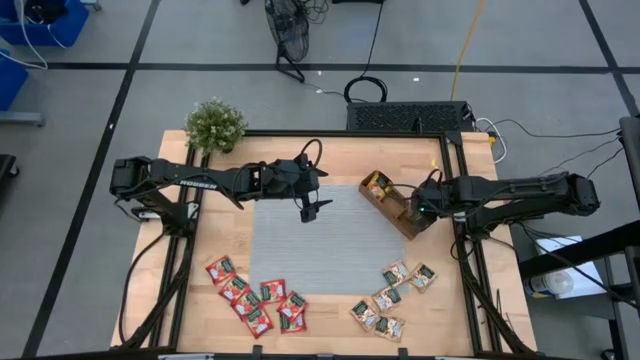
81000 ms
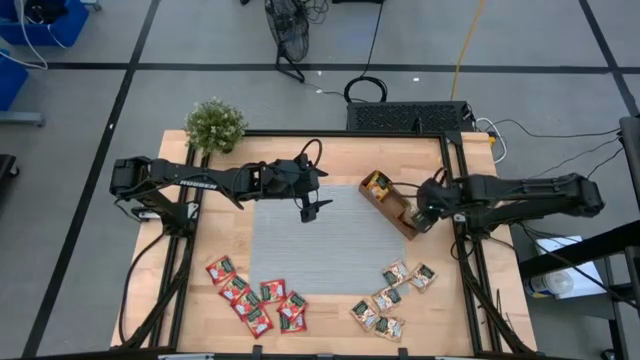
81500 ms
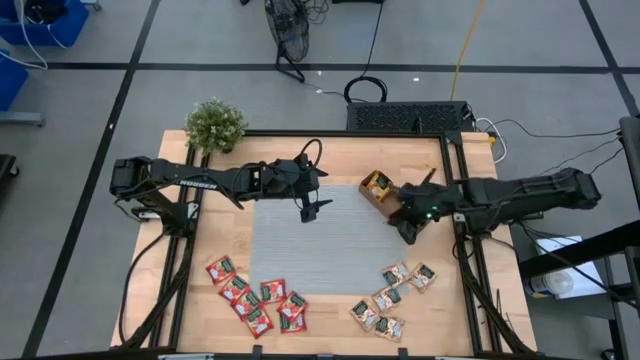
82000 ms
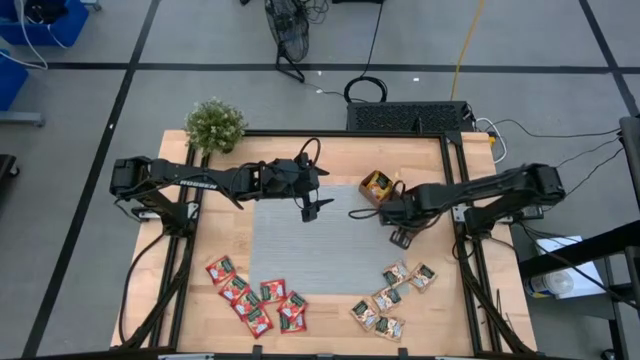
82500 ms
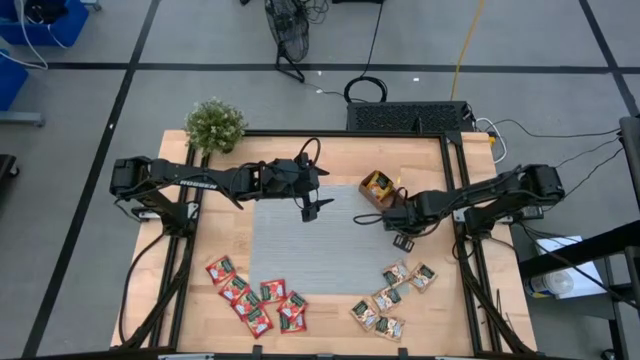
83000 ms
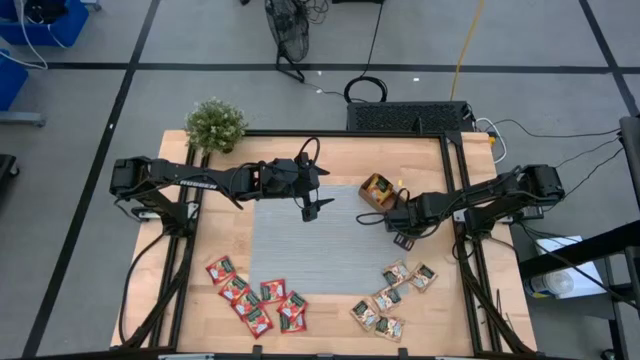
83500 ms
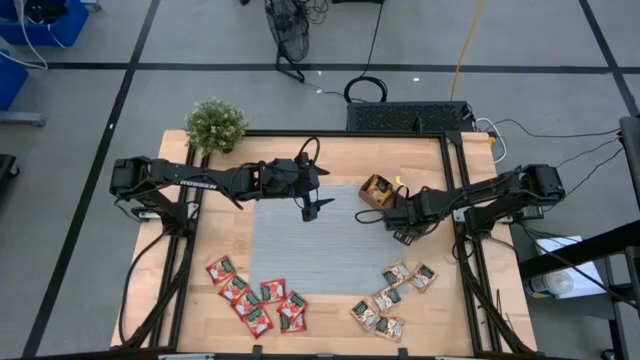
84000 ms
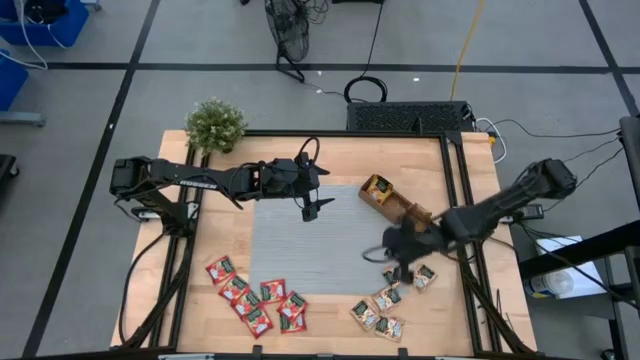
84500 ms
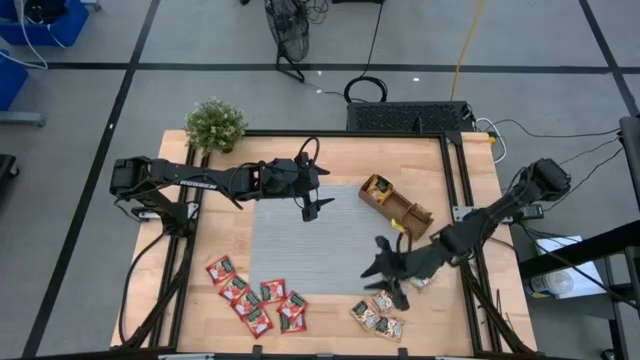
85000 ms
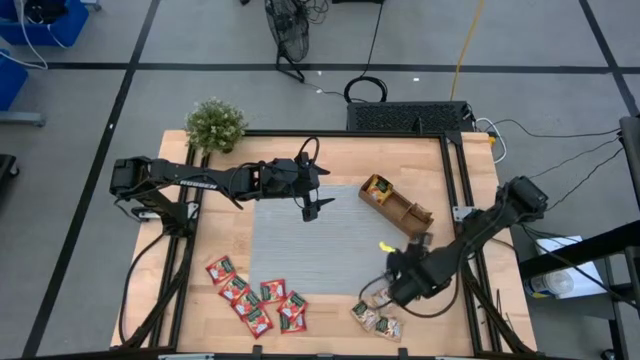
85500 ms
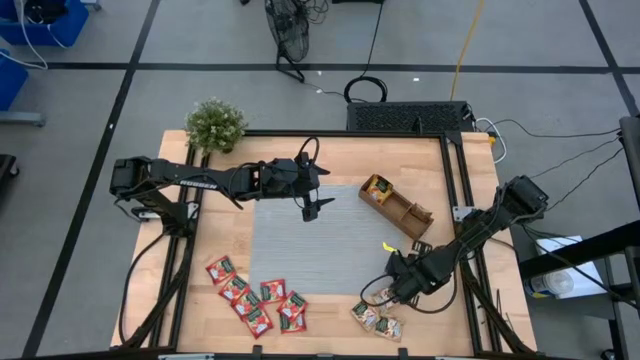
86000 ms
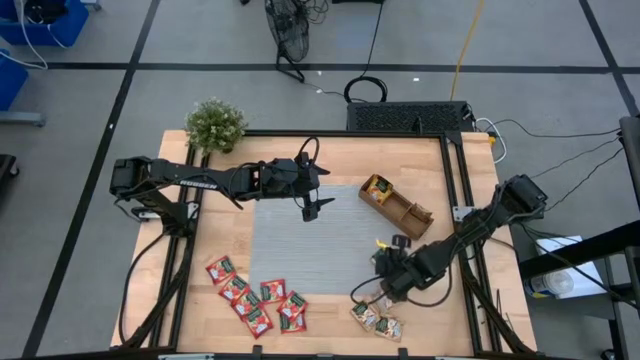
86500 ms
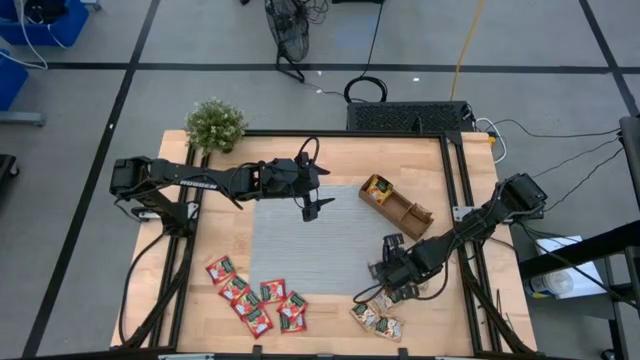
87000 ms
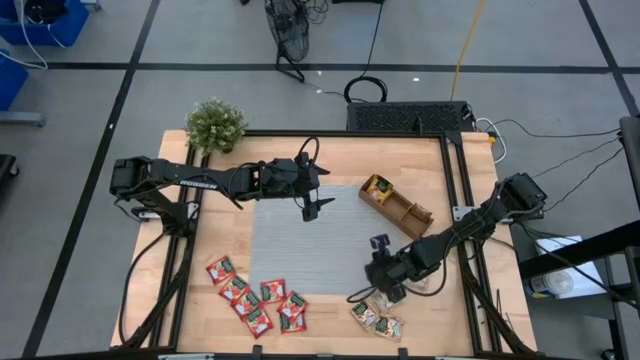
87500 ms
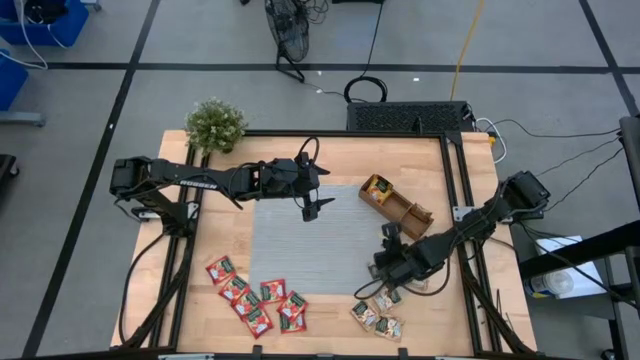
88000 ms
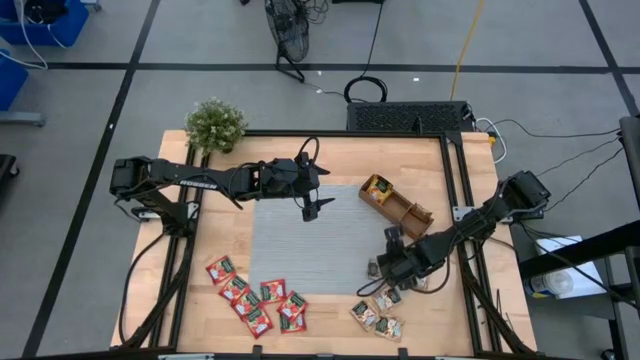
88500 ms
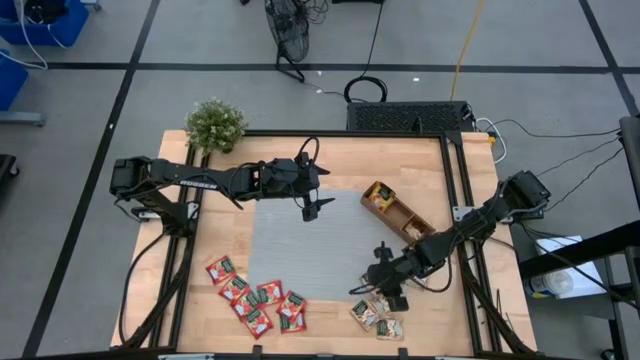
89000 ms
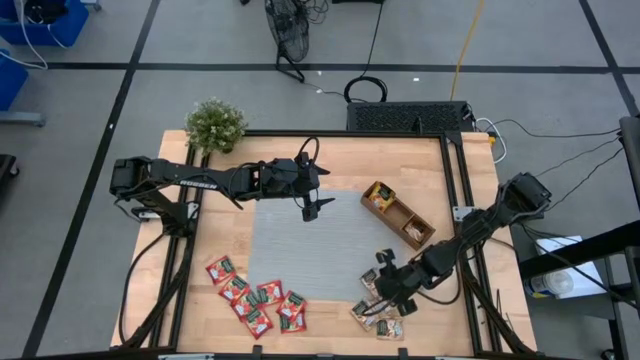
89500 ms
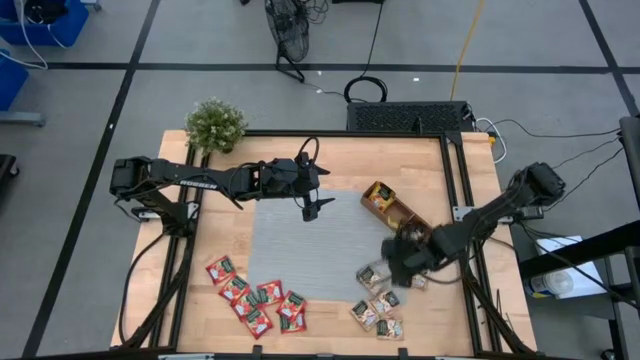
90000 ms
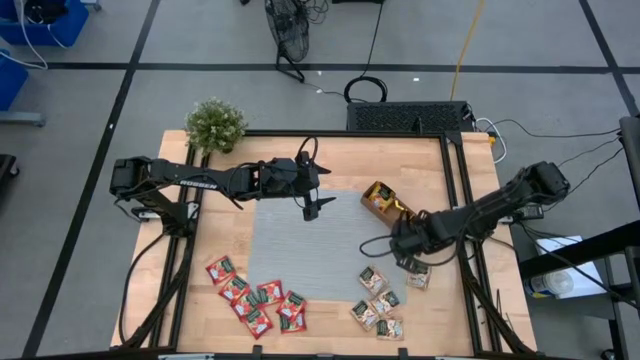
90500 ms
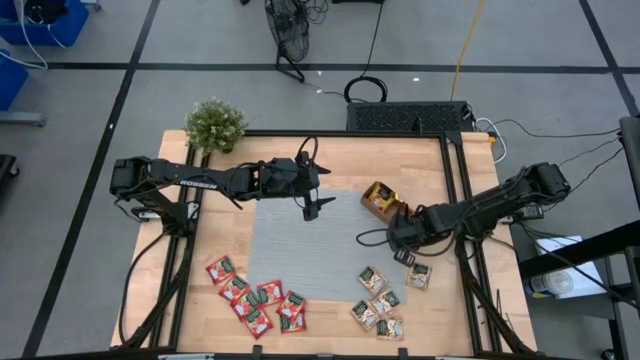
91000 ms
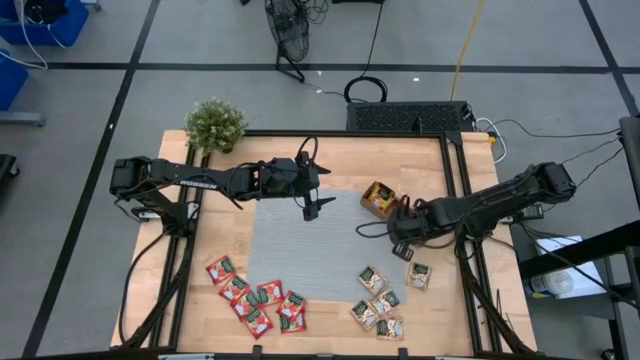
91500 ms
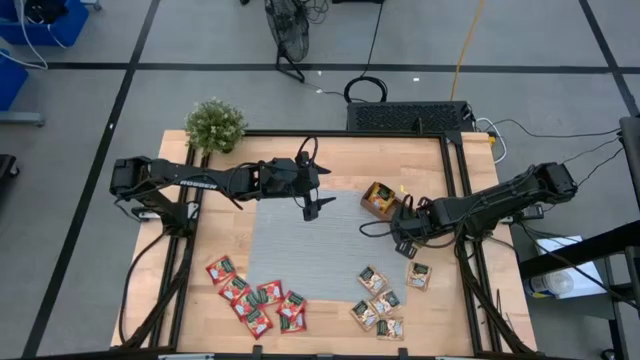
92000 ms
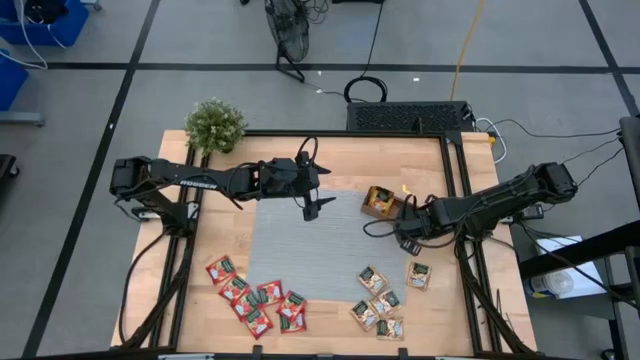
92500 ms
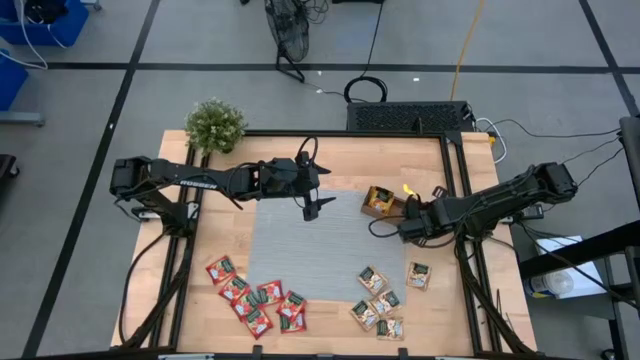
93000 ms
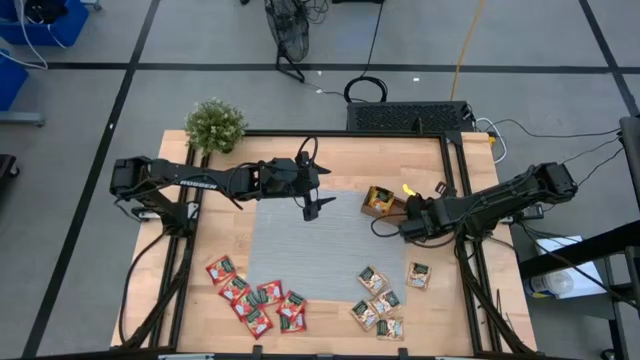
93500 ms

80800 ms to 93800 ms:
Task: Pick & Place Tea
Put the brown tea bag into the right section of the wooden organizer

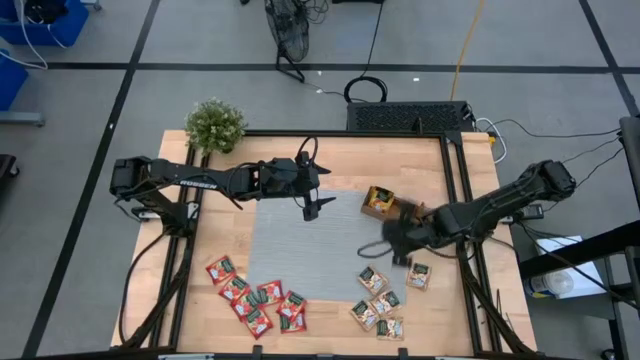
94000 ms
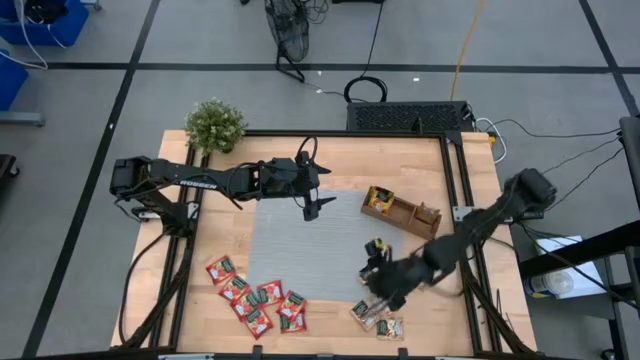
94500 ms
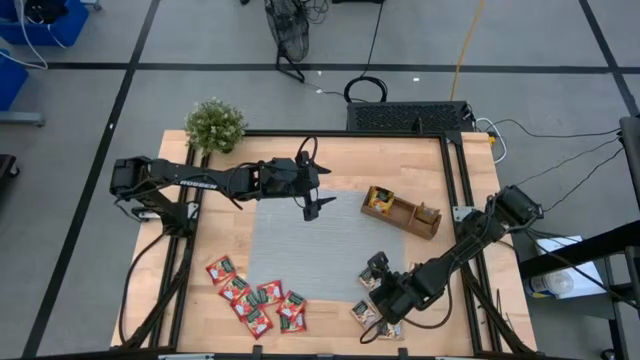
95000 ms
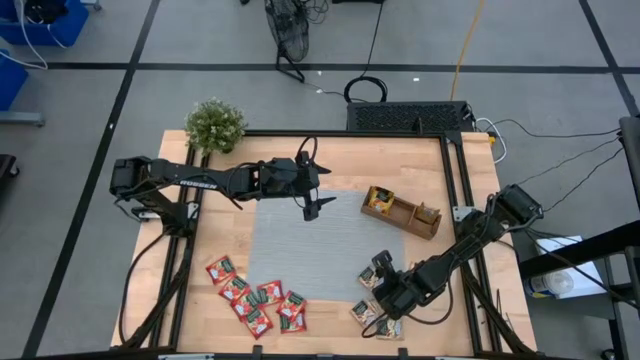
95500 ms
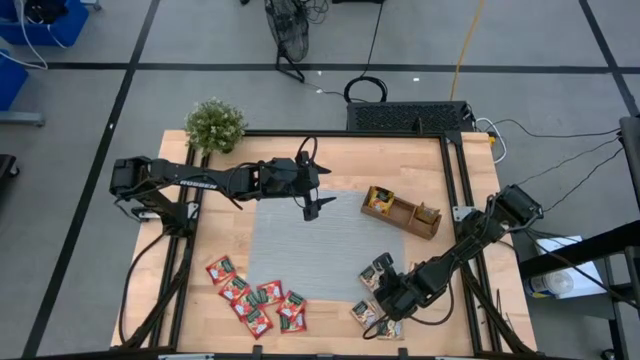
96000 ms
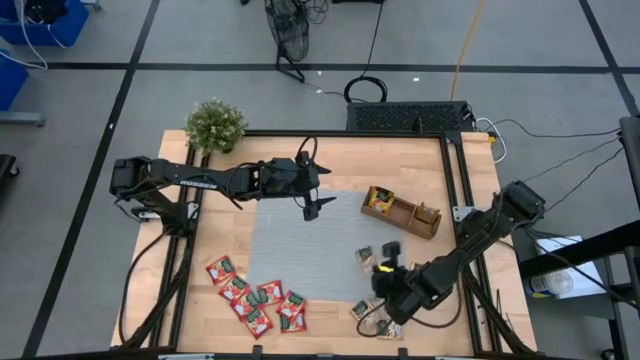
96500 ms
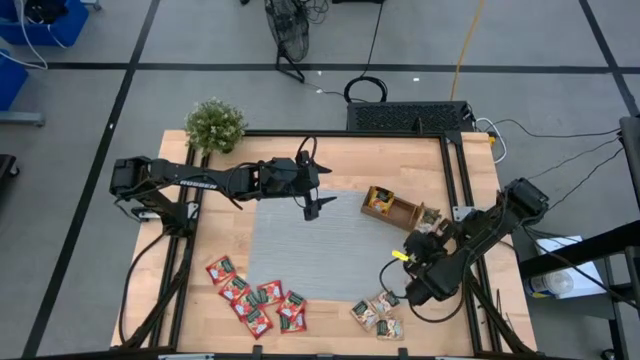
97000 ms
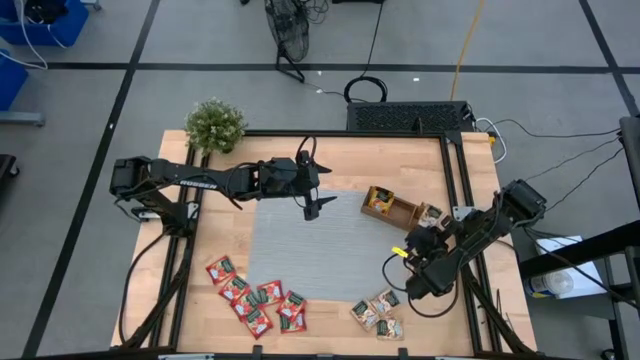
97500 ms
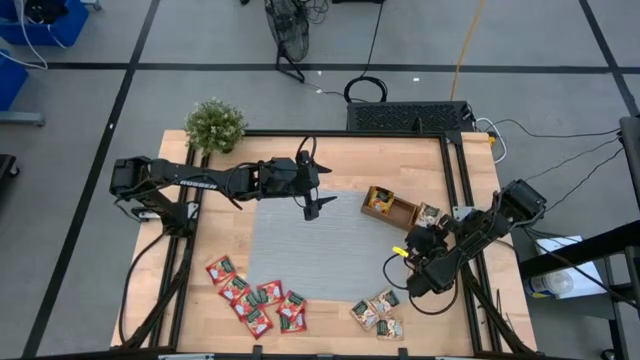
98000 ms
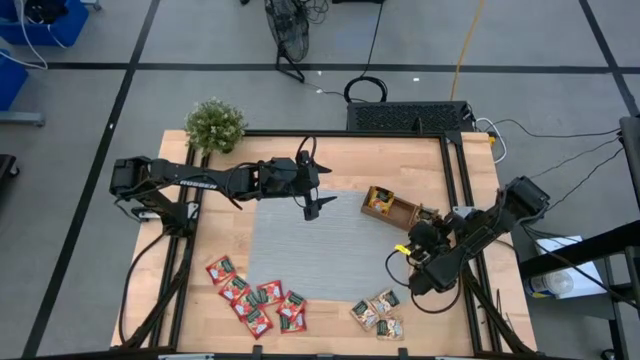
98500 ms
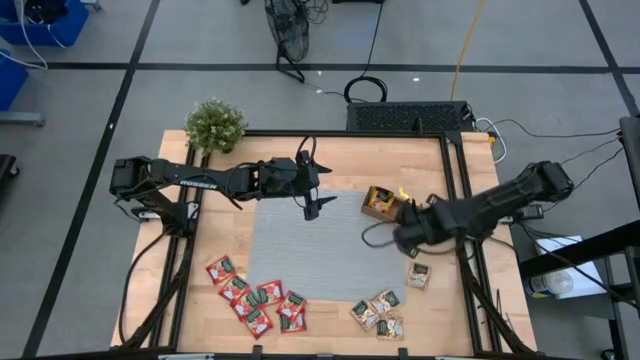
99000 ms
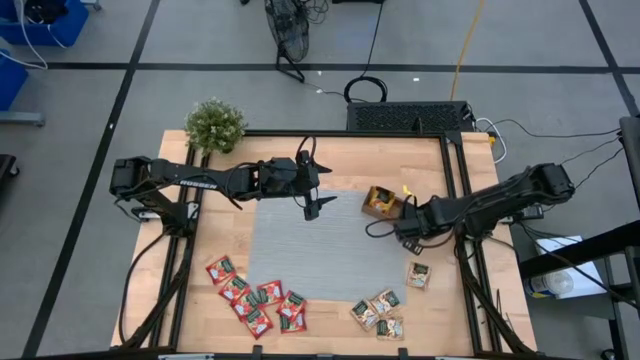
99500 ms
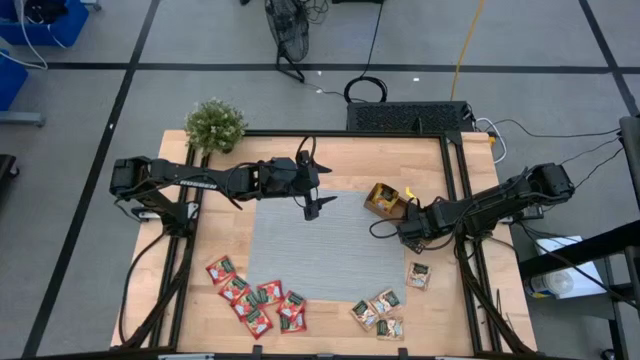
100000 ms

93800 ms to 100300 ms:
Put the brown tea bag into the right section of the wooden organizer

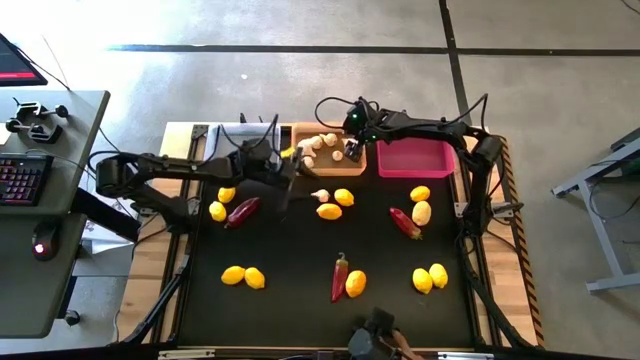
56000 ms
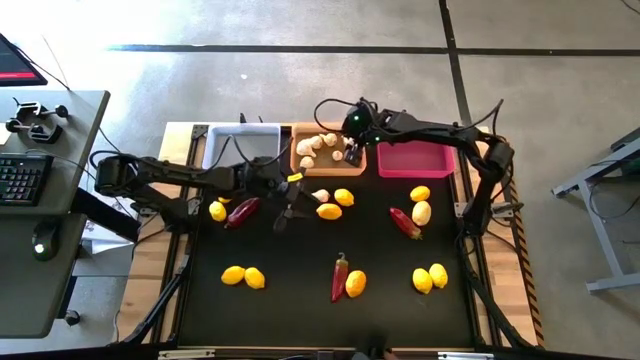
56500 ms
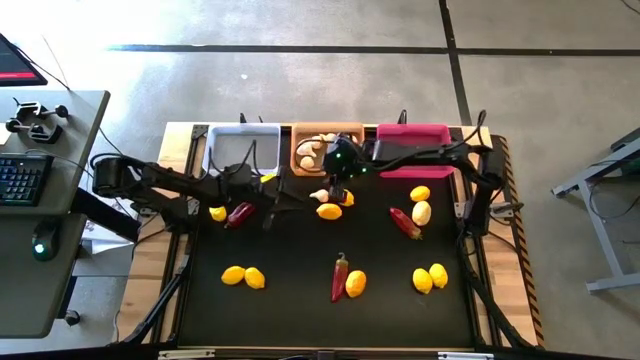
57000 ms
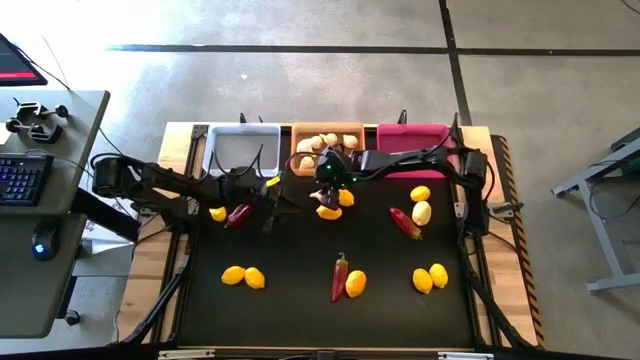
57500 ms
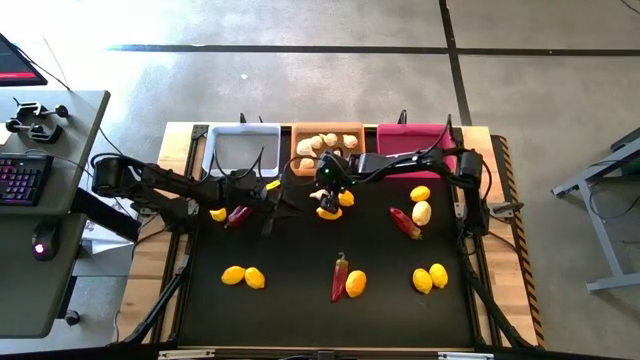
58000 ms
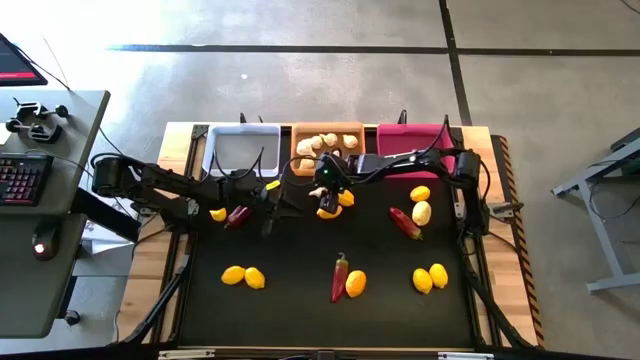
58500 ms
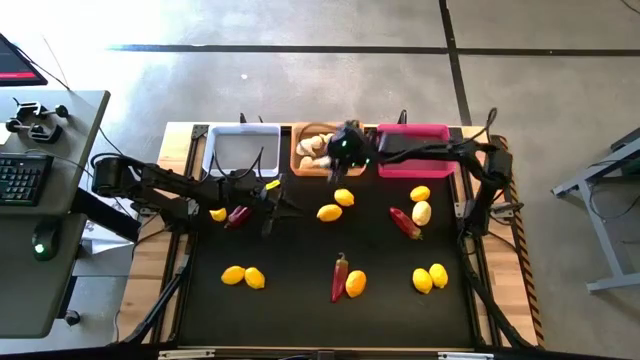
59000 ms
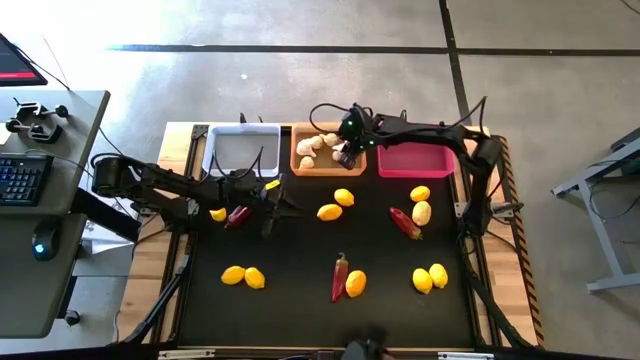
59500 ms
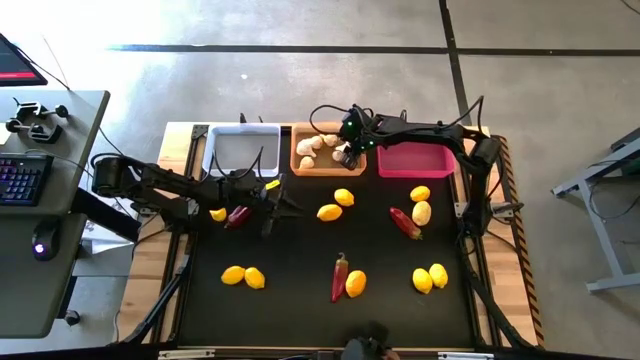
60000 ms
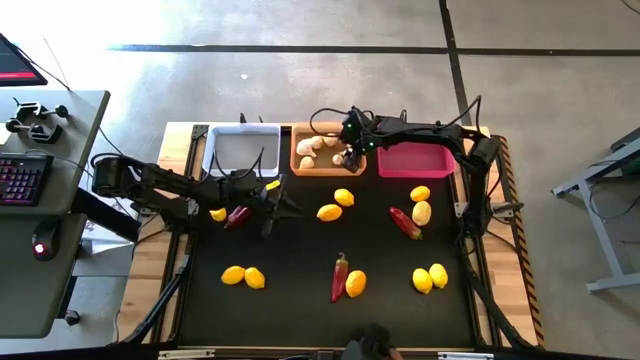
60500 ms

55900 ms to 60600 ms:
Task: Sort produce into baskets
Put the white garlic into the orange bin
